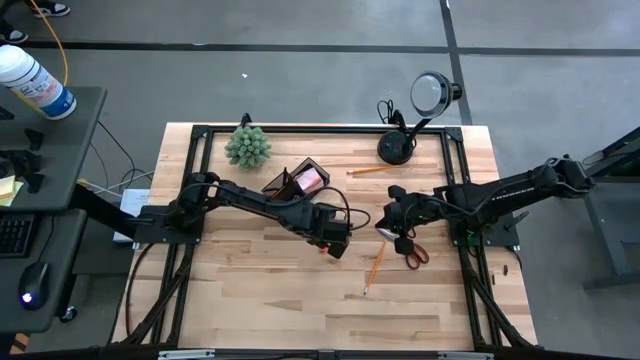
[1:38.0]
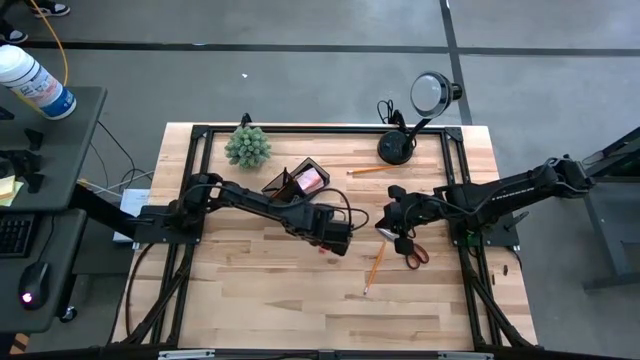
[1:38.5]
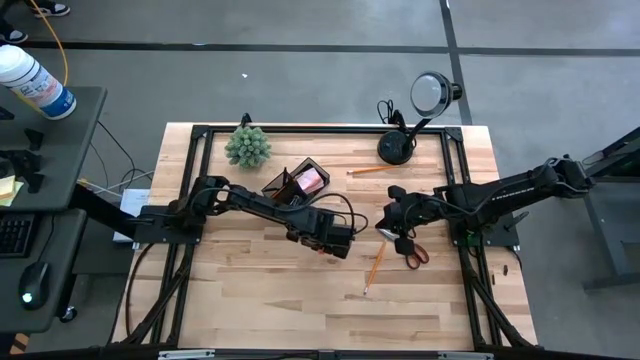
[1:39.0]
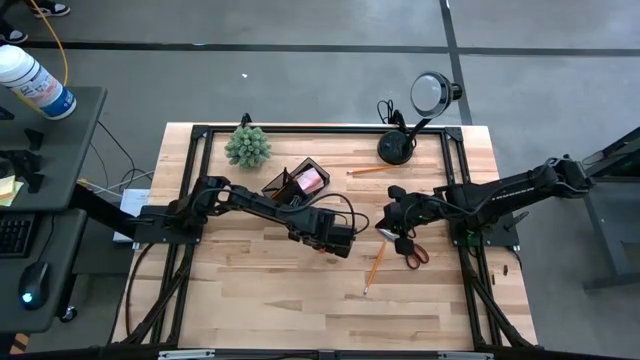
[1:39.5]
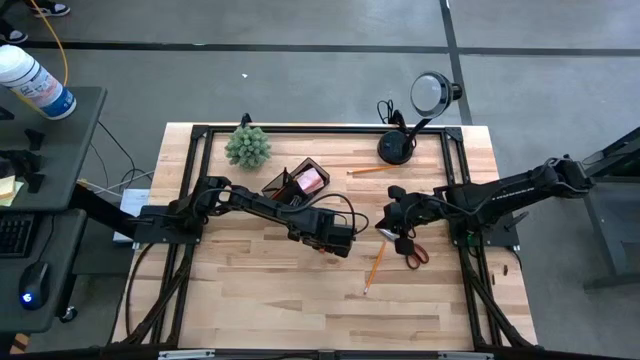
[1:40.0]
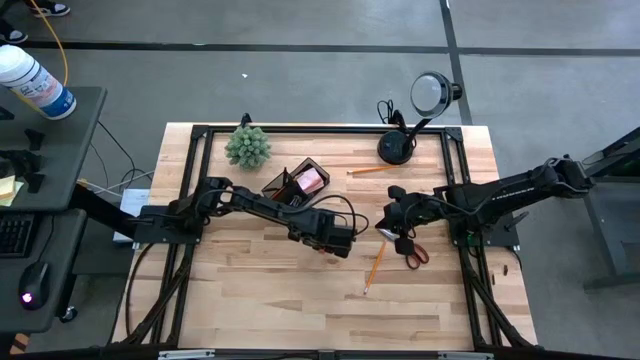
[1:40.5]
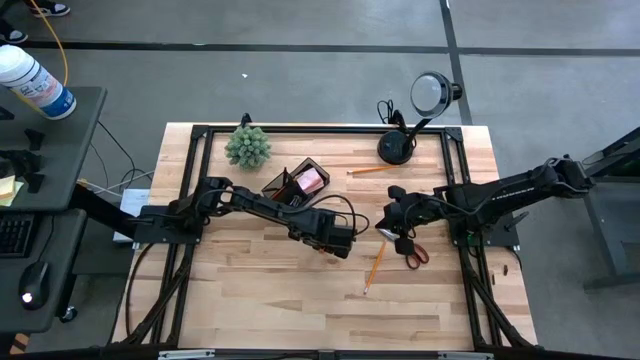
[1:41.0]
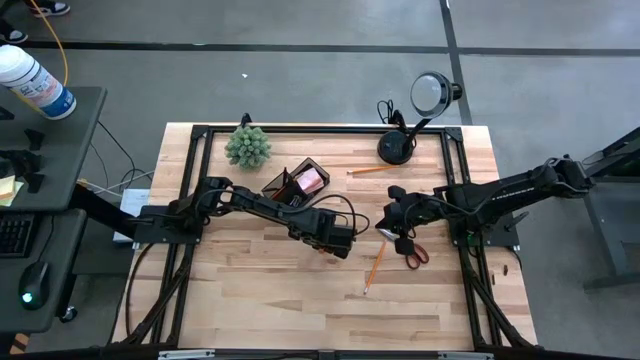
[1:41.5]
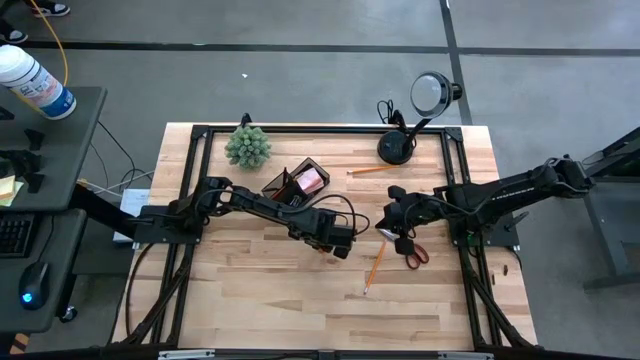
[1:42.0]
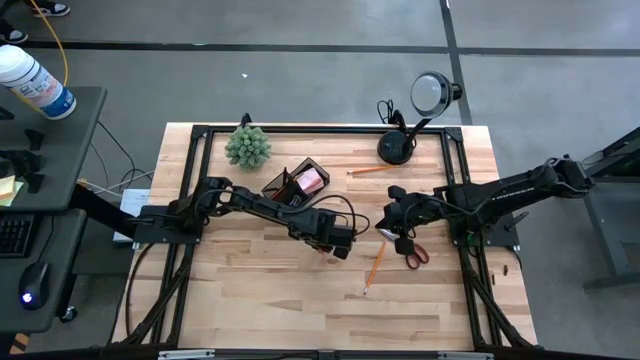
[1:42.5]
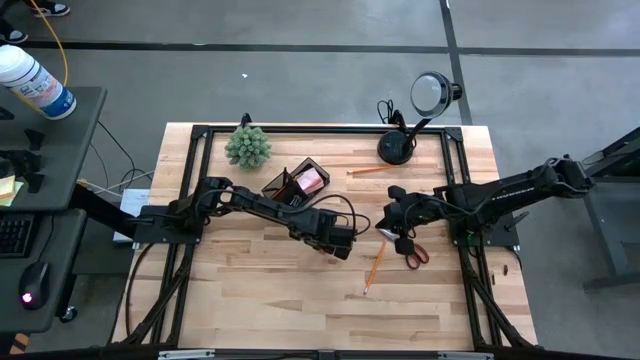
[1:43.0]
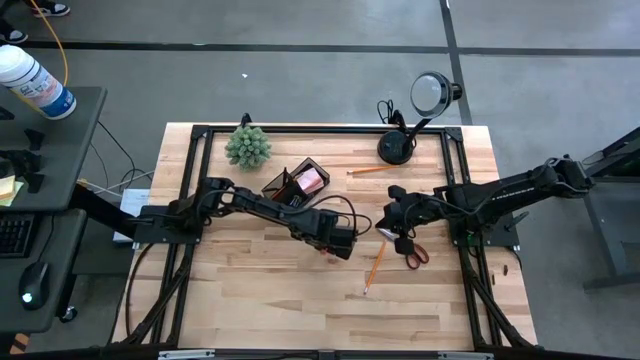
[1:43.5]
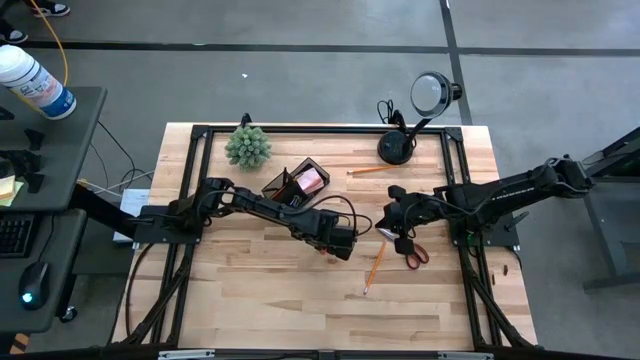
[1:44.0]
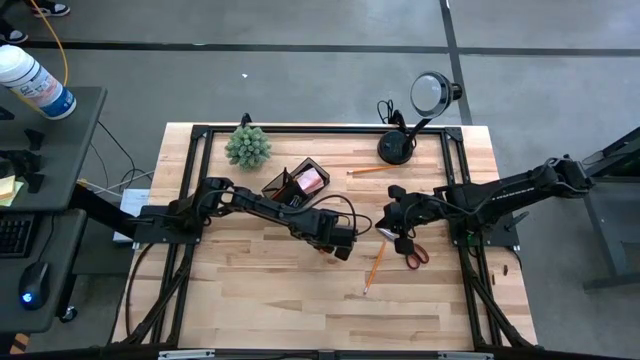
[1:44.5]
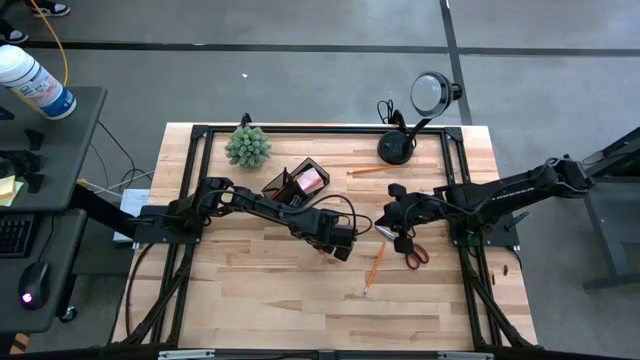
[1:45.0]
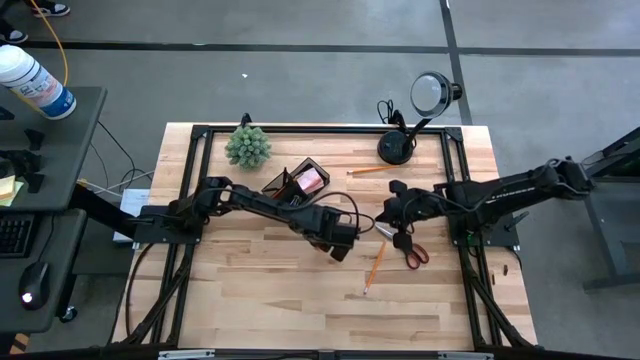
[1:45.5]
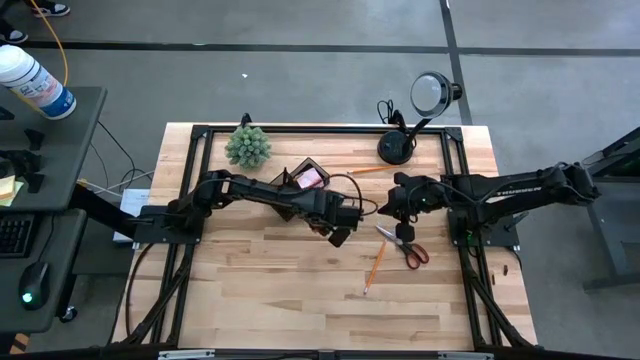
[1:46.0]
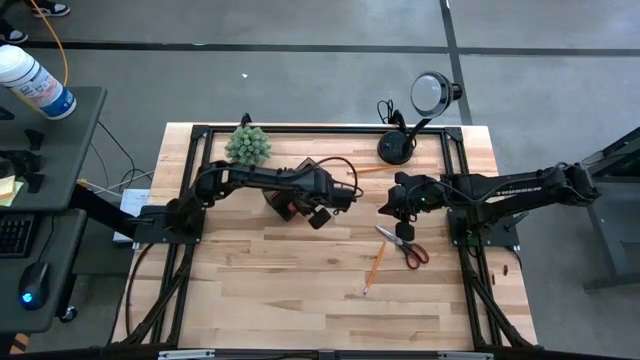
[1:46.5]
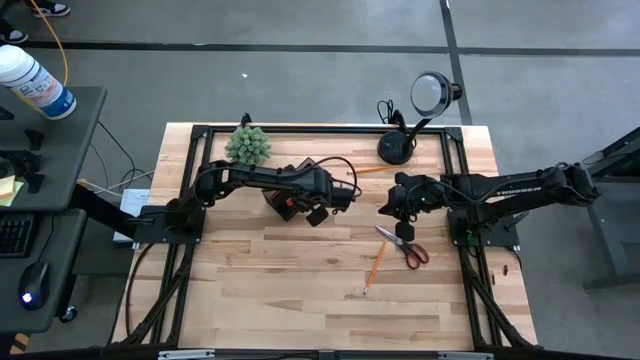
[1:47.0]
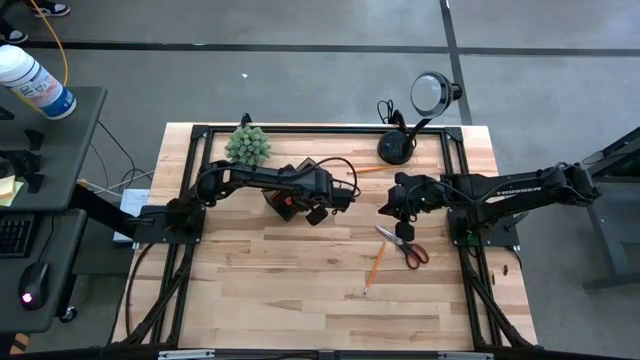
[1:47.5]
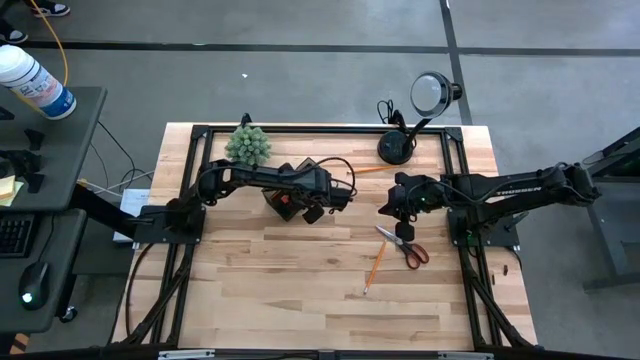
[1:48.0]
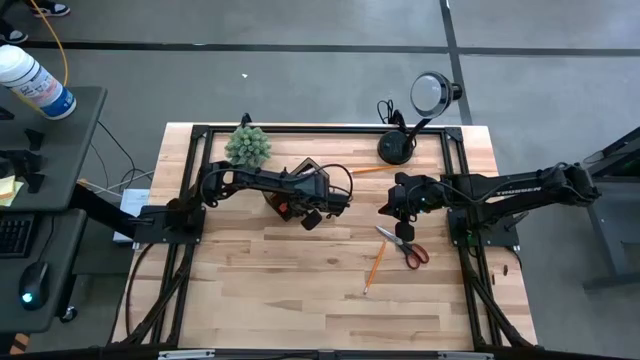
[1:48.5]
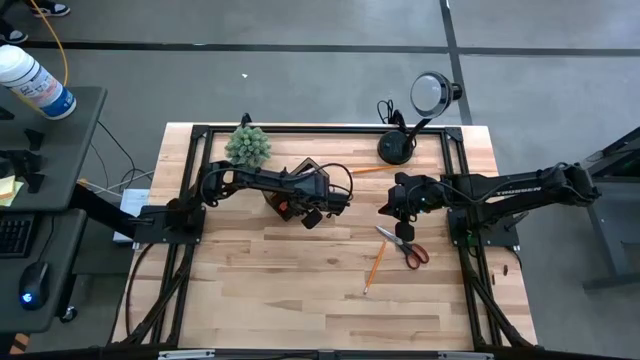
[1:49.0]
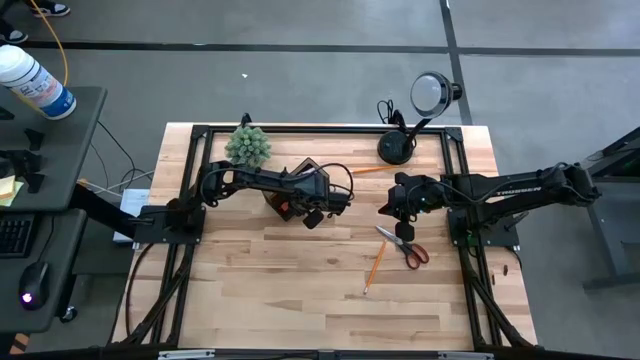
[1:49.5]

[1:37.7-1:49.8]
Task: Pick and place office supplies into organizer
Put the orange eraser into the black desk organizer

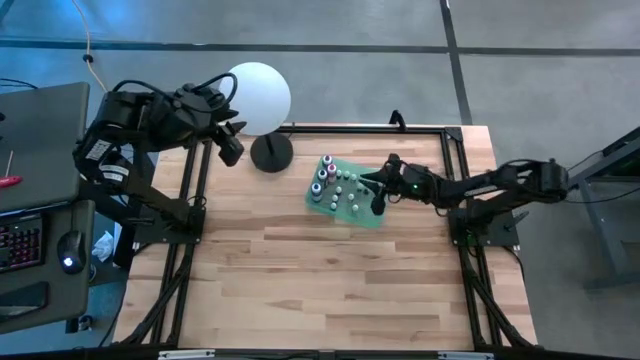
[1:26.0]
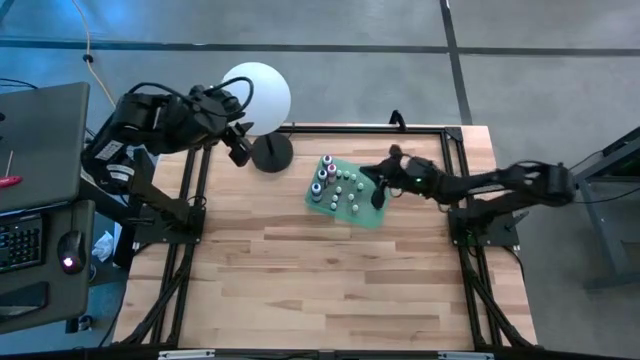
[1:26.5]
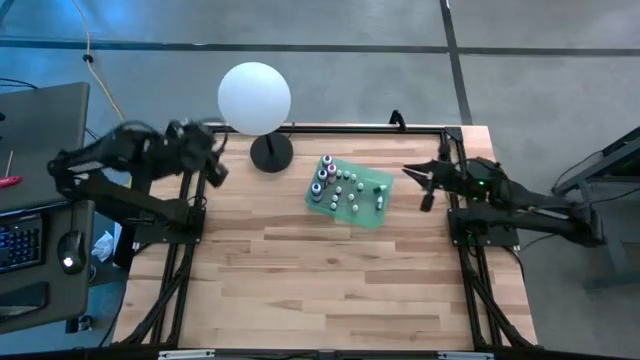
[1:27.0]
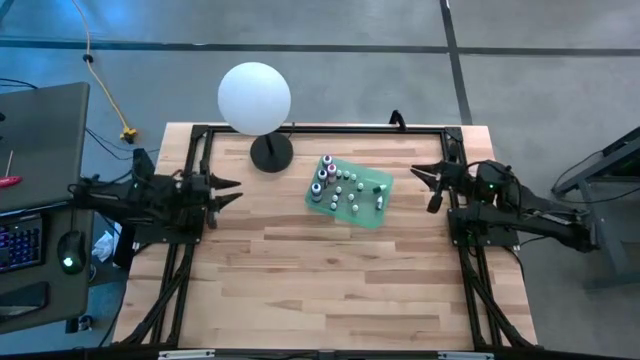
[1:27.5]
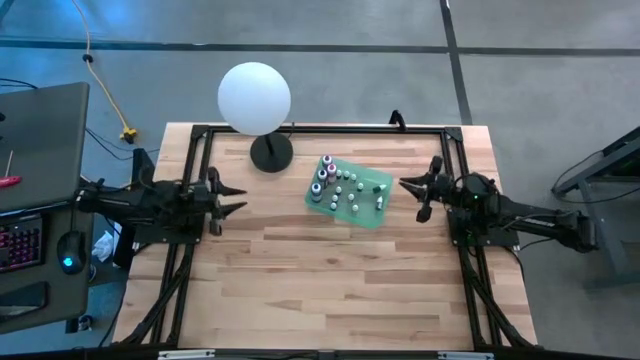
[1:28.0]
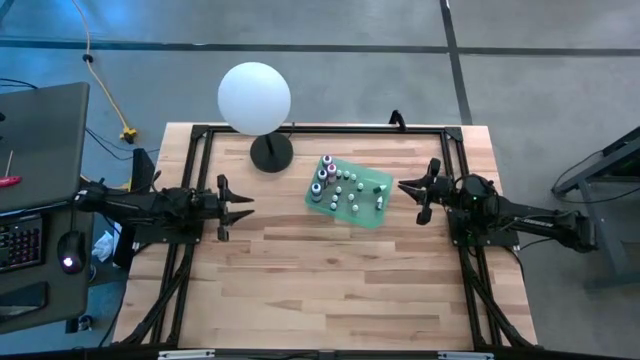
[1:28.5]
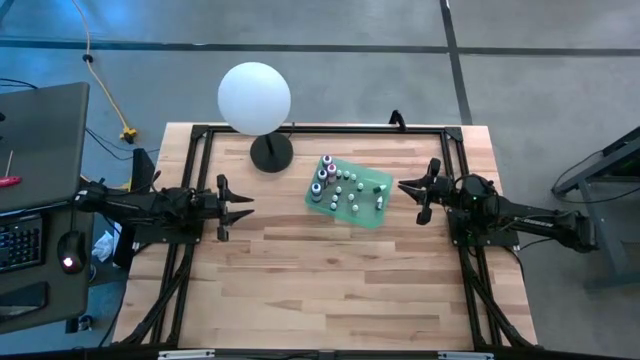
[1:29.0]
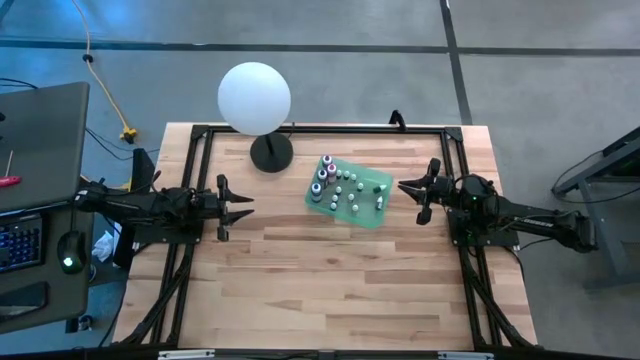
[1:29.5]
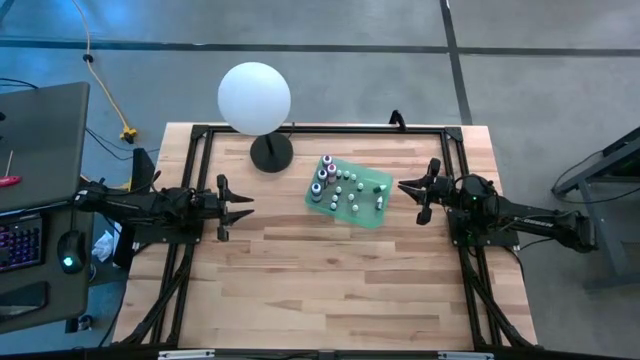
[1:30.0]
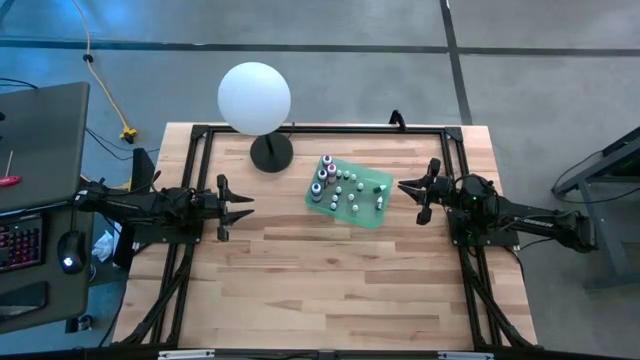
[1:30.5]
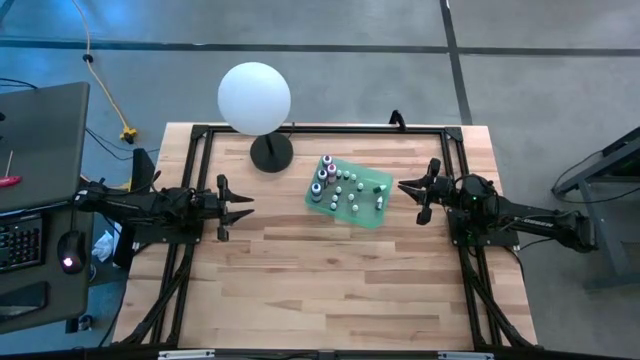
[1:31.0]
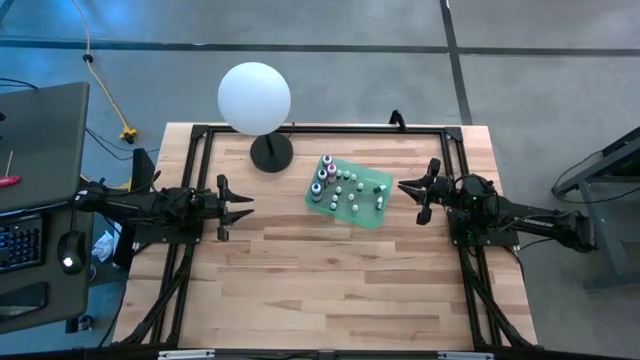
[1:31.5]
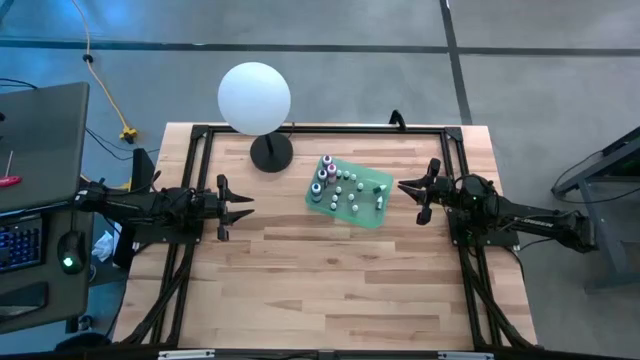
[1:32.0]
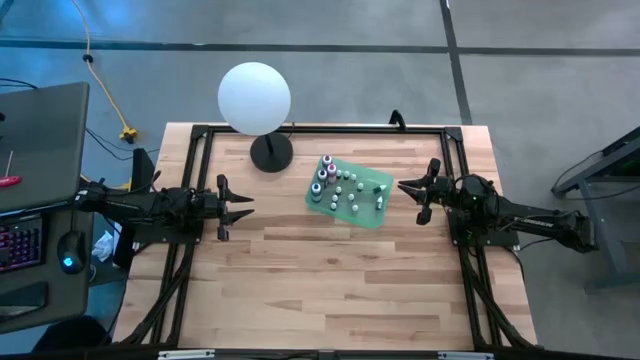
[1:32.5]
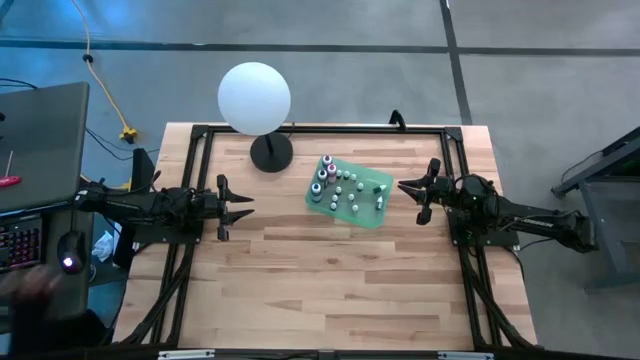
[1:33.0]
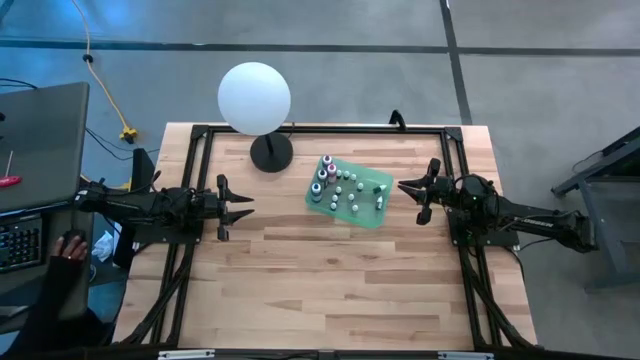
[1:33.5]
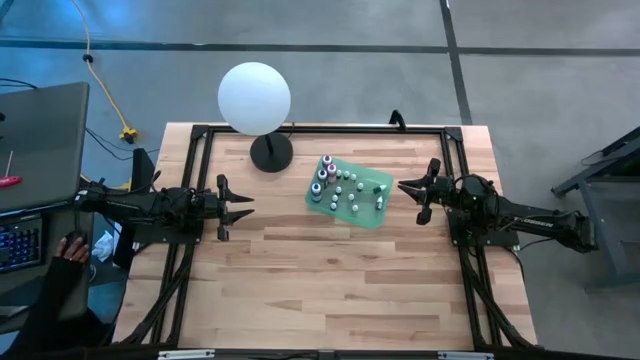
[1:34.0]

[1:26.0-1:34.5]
Task: Pick & Place food coloring
Return to Home Position
